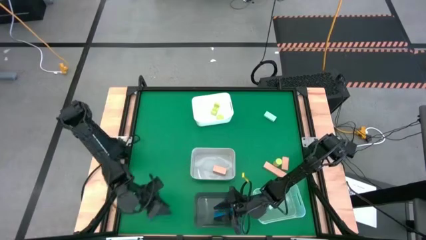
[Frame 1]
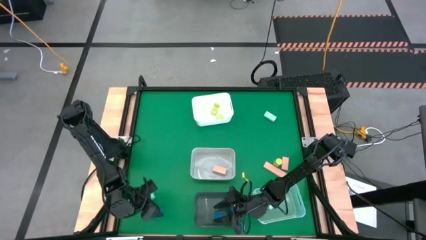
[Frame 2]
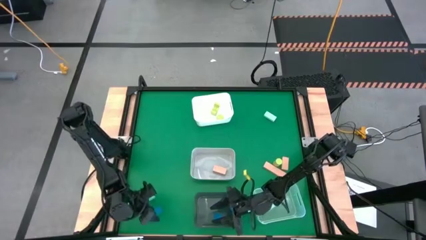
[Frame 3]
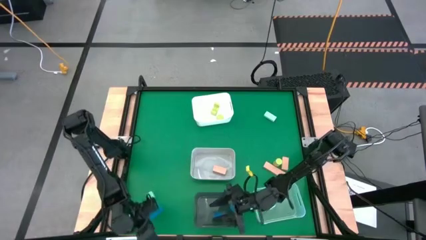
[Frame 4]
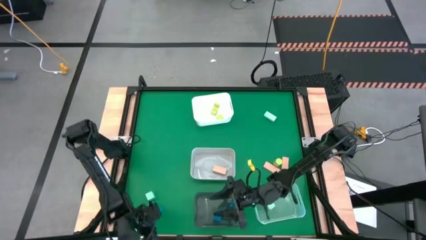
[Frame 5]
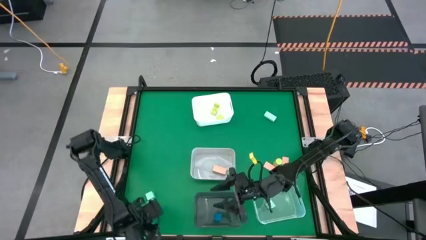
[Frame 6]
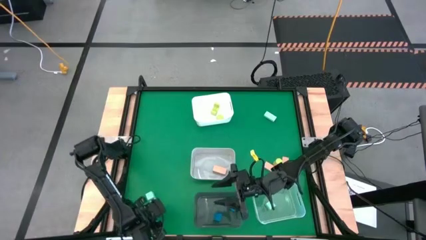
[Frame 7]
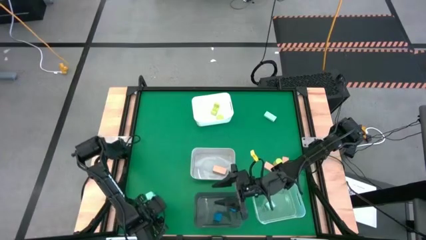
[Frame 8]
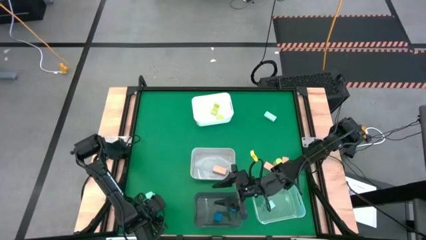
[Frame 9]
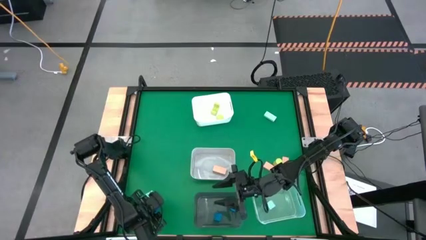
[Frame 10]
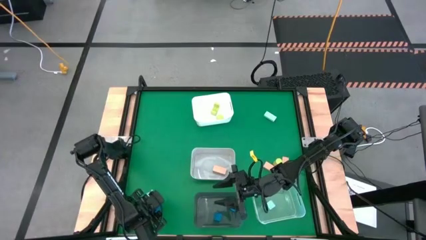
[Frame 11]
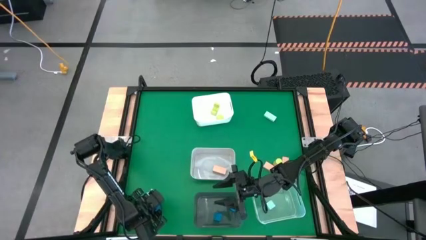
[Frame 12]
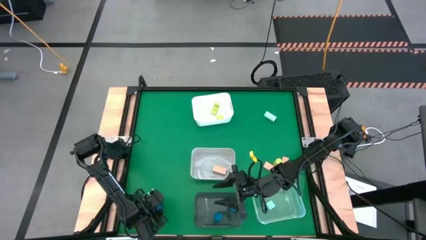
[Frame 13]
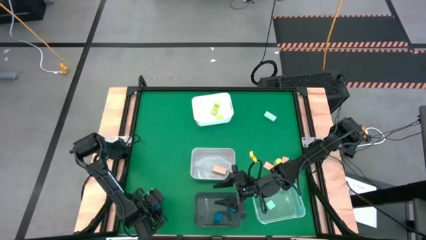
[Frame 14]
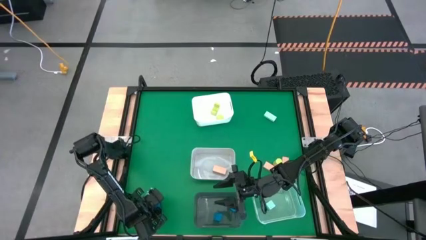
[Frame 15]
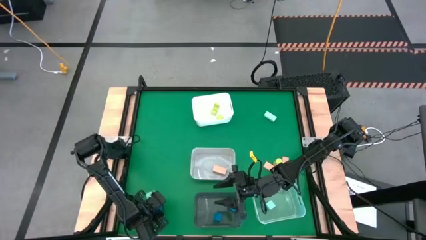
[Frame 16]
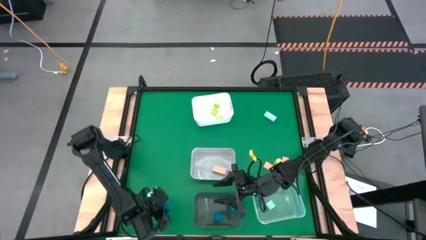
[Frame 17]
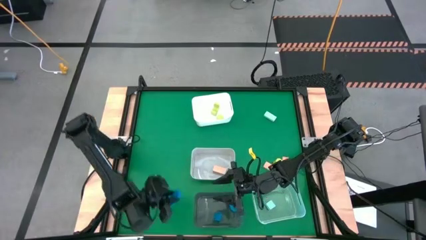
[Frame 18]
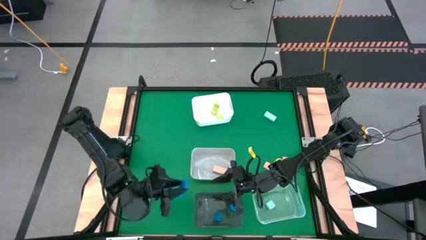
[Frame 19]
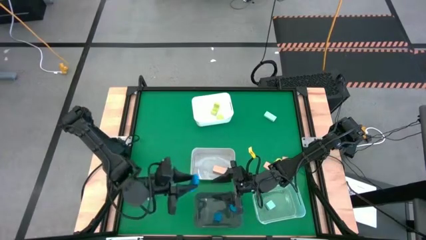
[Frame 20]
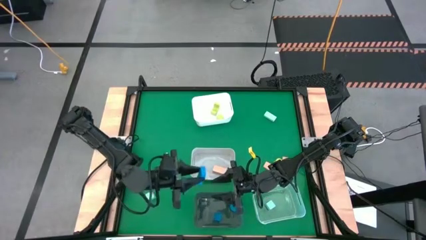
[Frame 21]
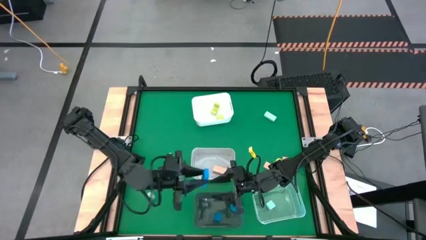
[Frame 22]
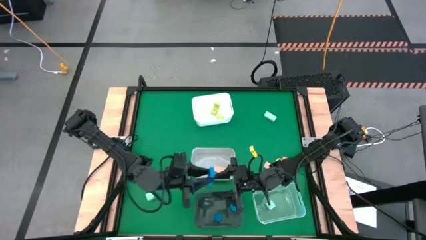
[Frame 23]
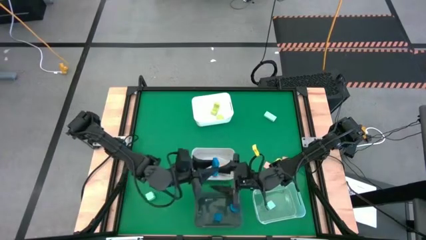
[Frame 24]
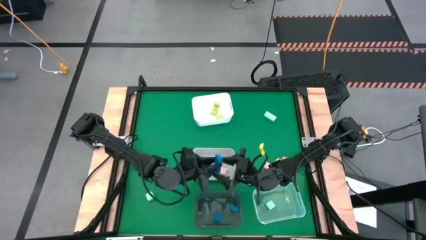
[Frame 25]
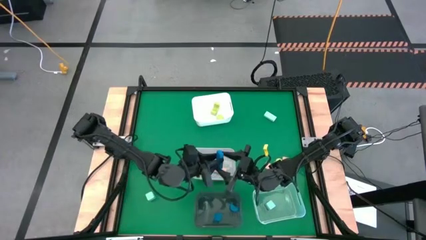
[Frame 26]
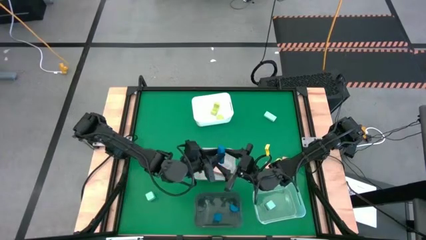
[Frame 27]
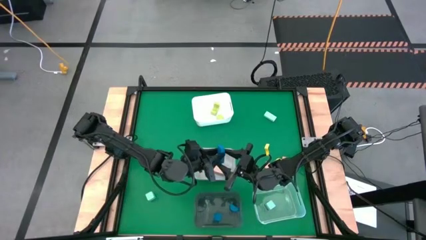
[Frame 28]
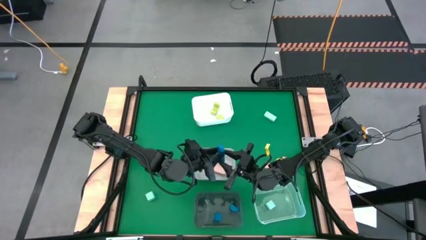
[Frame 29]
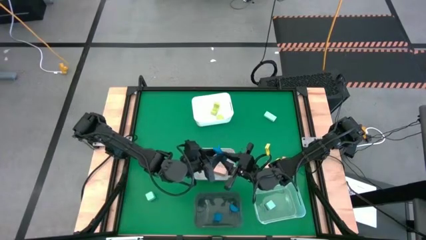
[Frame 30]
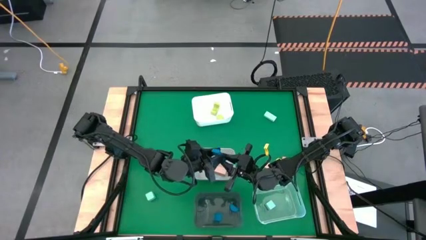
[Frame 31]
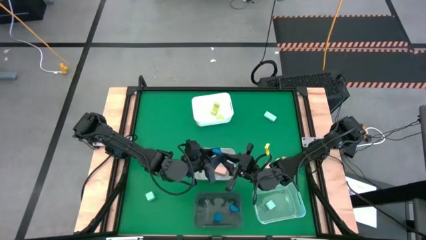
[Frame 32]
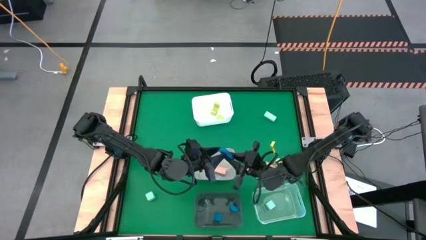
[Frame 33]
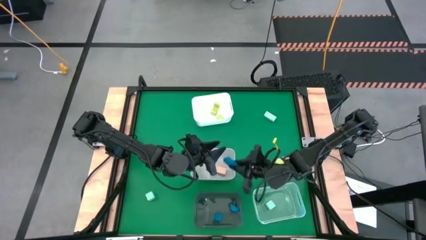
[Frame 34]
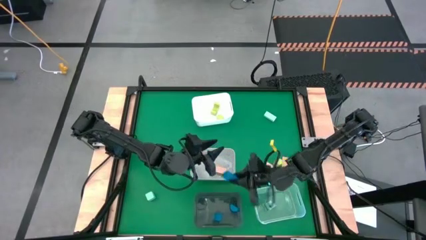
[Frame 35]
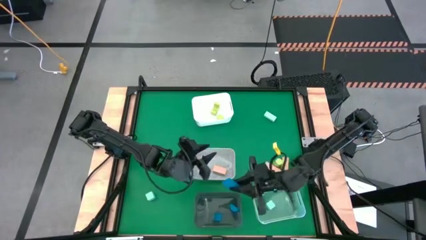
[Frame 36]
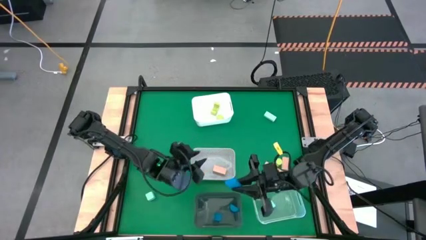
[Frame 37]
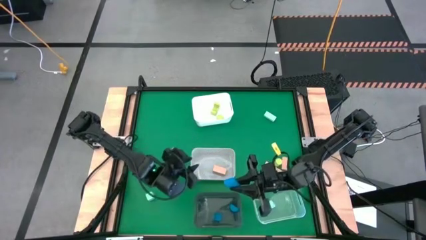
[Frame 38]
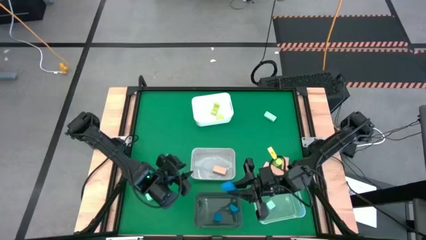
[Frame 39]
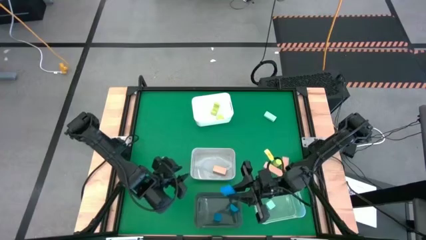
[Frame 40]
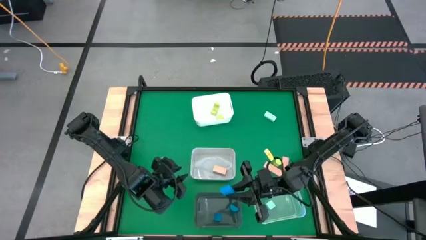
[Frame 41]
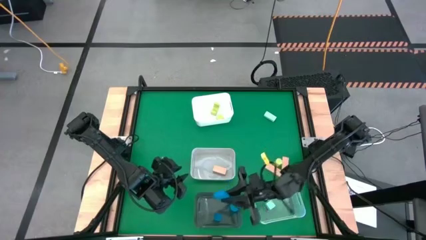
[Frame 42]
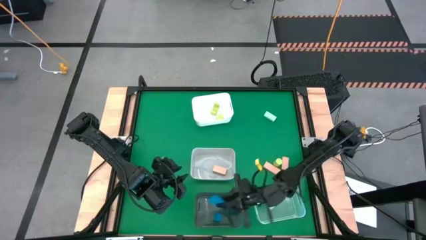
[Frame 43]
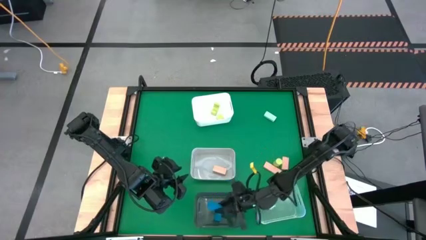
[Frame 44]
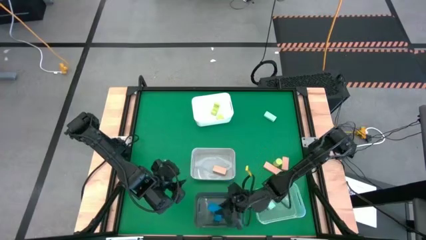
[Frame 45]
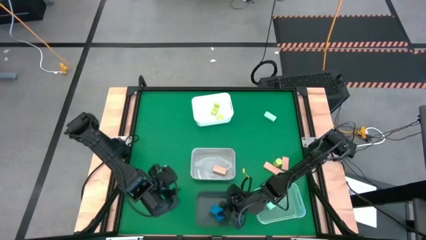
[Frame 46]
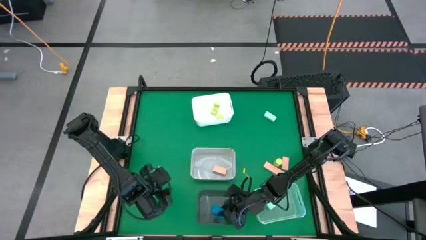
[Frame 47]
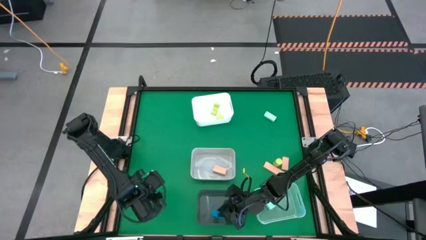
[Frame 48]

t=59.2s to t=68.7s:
Task: Sort & place blocks by color
Put the blue block into the black bin

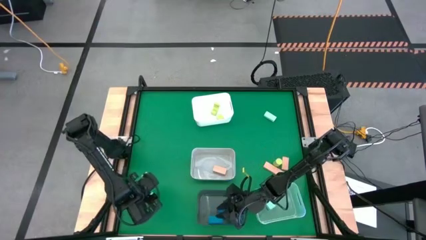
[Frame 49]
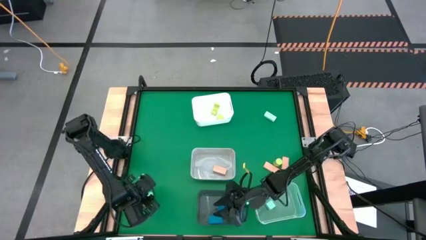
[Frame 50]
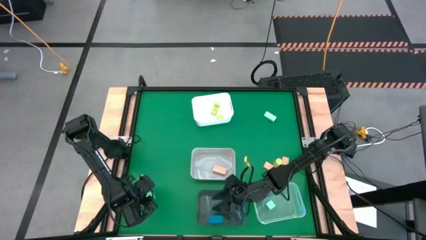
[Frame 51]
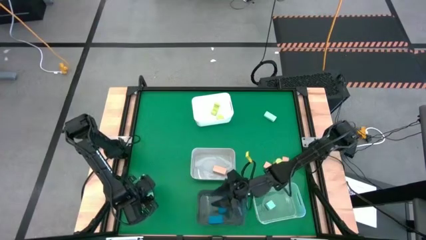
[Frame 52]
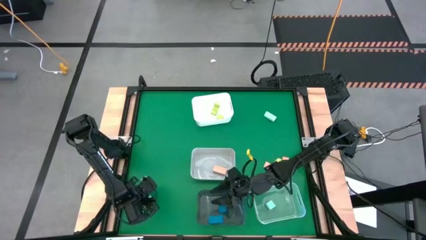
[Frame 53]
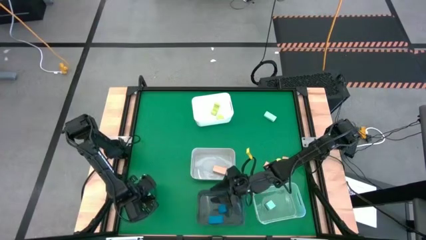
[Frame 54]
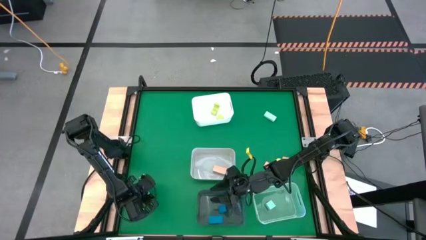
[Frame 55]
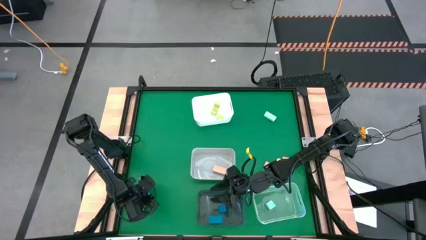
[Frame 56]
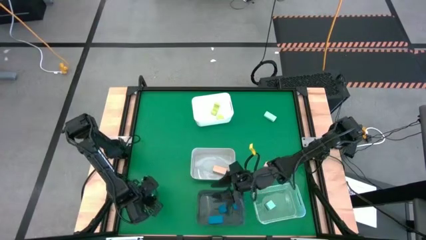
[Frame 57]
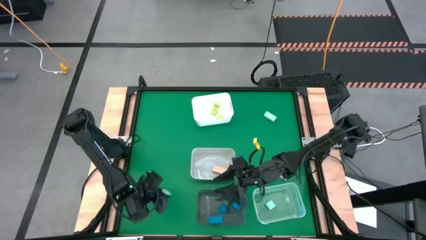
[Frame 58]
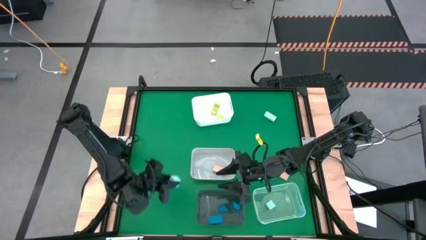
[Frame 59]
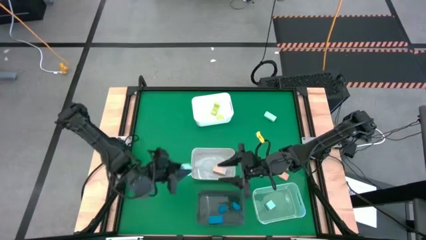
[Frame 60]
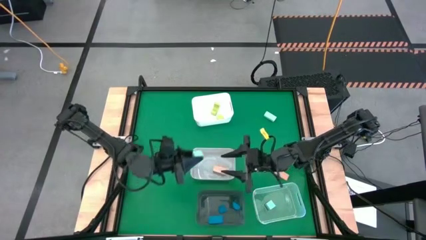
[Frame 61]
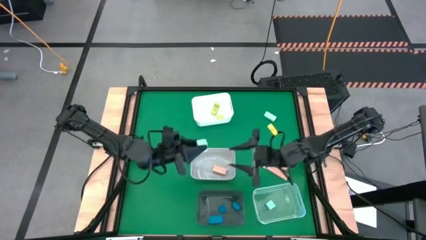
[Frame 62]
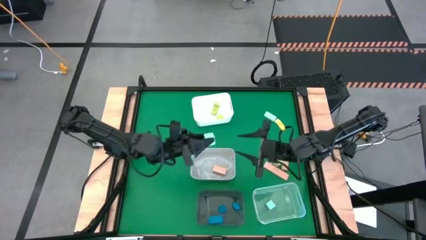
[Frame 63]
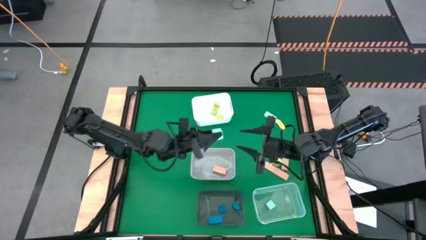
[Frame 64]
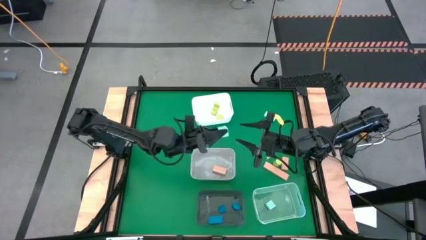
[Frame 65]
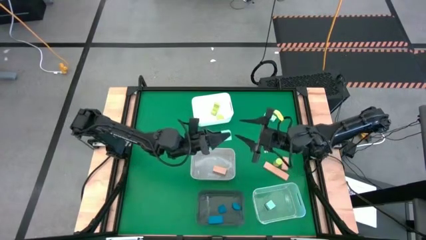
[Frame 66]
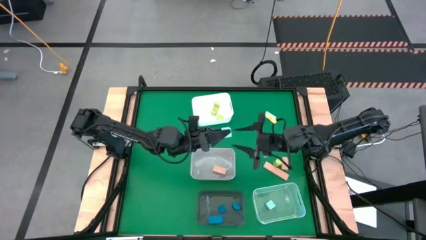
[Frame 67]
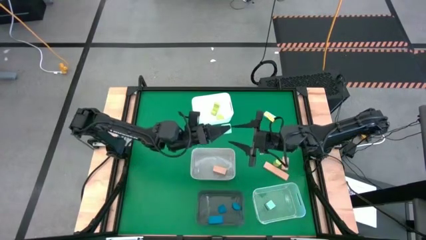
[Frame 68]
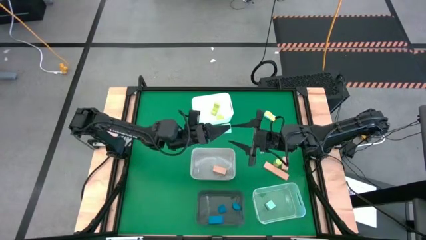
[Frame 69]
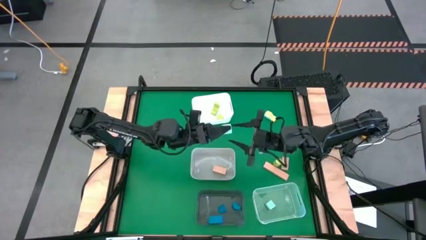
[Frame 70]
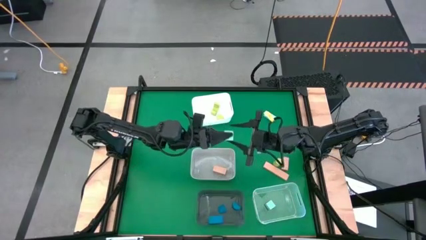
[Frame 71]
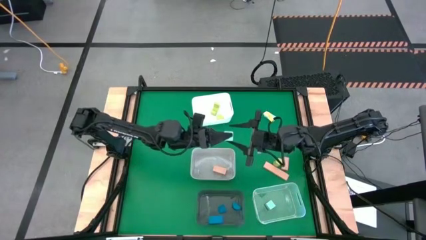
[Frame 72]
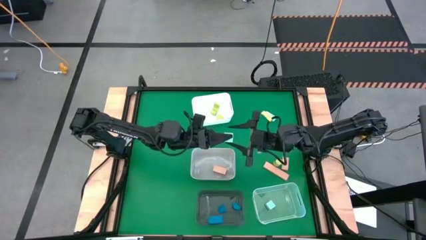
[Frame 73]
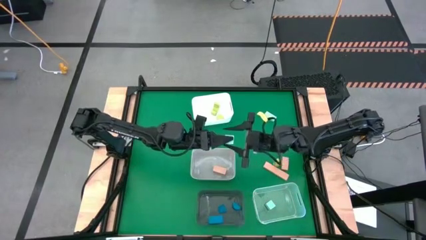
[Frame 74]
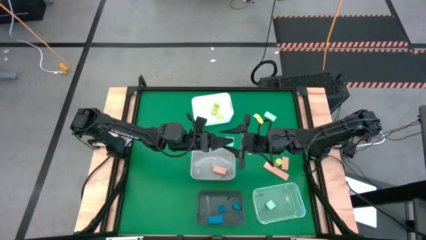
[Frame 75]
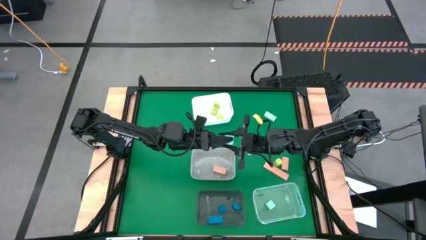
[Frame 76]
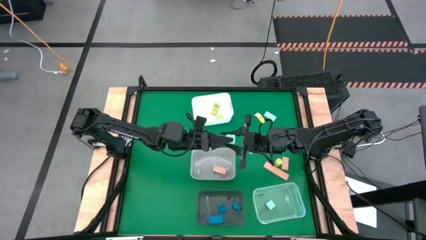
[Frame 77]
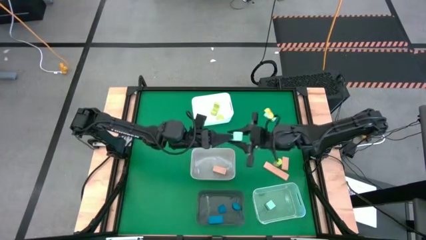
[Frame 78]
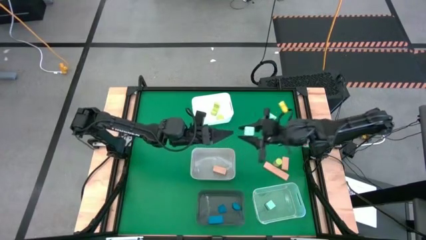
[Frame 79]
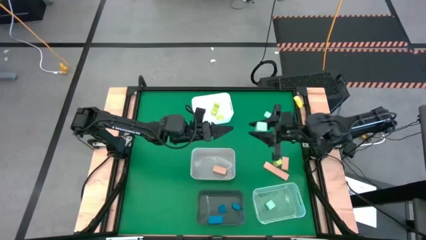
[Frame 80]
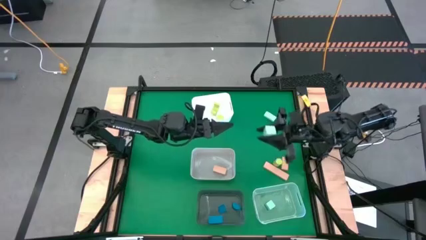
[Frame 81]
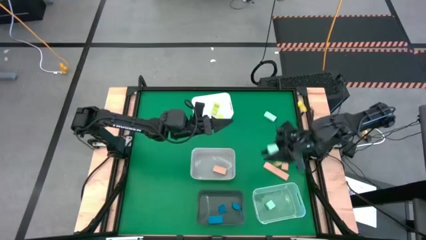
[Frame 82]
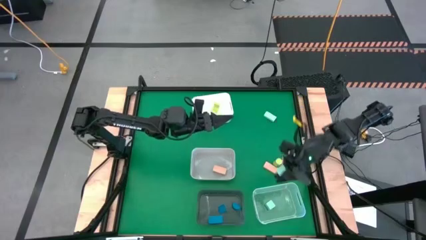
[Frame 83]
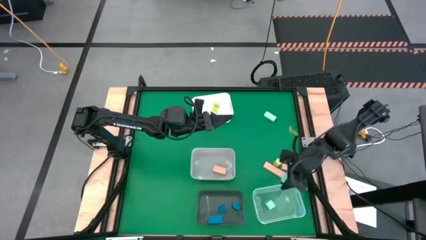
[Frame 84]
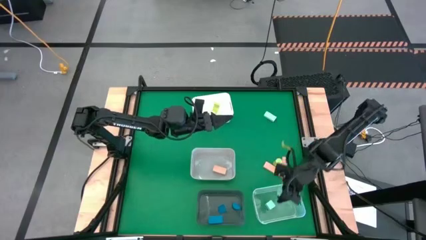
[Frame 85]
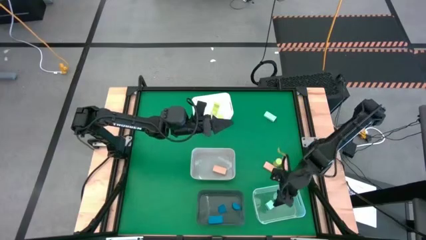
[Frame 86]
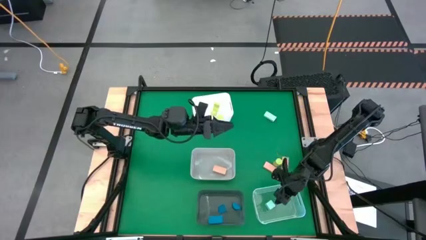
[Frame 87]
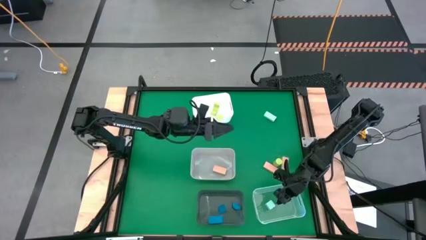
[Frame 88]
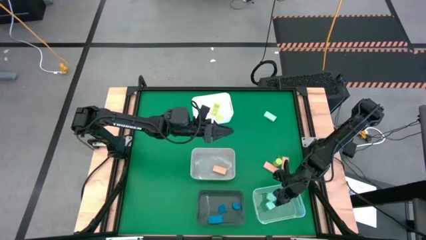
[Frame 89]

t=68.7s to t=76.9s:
Put the bottom light blue block into the transparent bin
